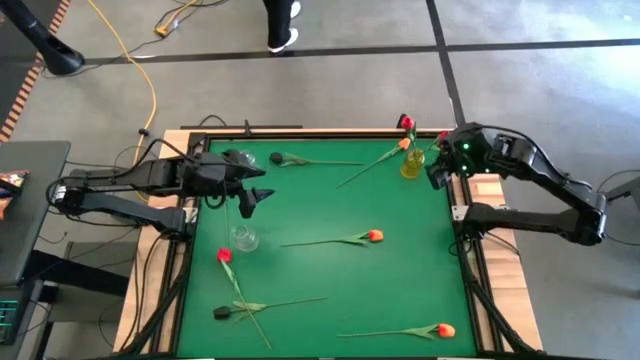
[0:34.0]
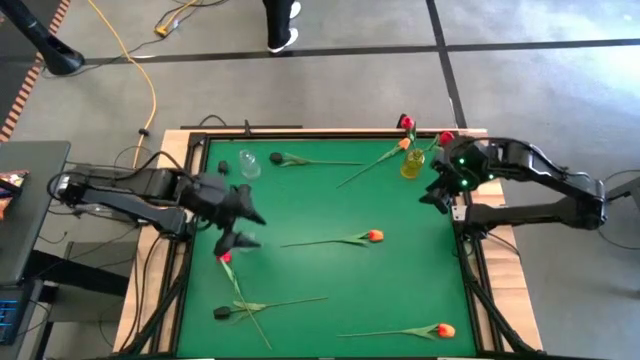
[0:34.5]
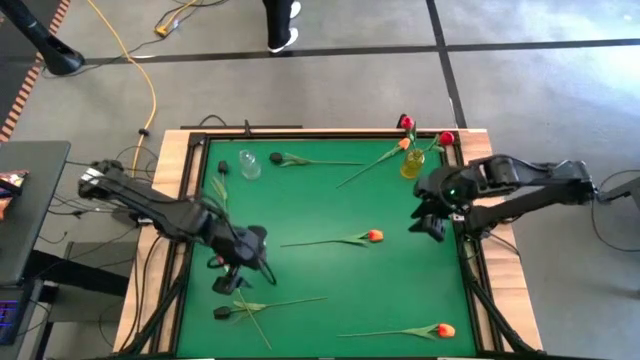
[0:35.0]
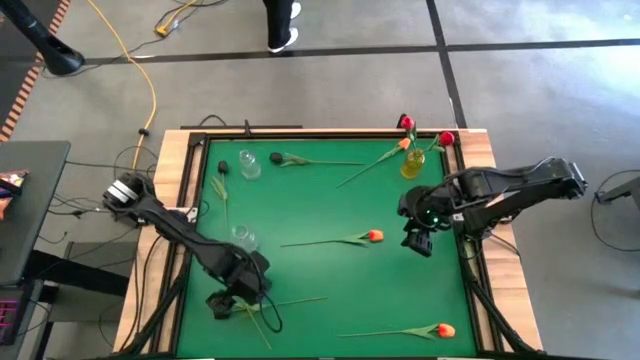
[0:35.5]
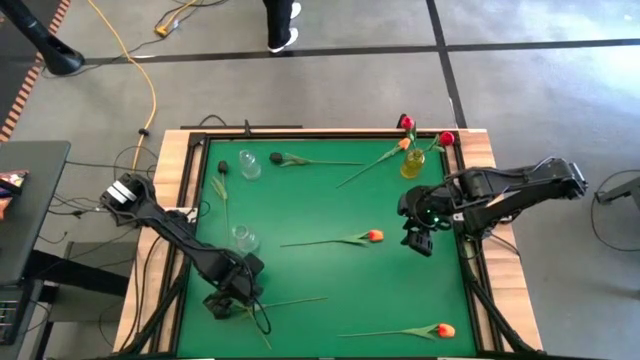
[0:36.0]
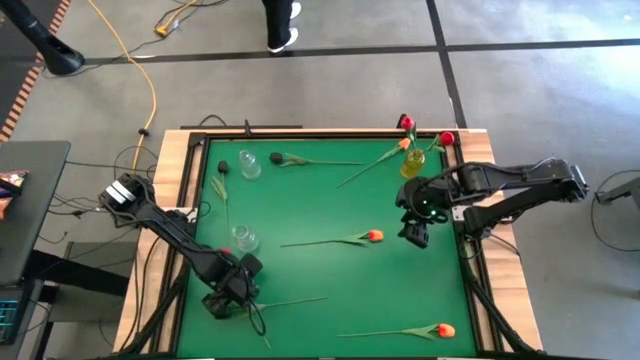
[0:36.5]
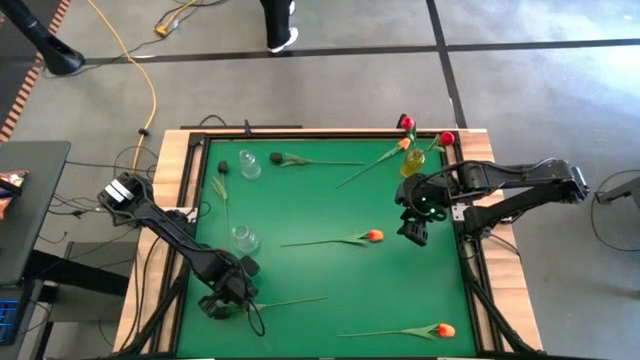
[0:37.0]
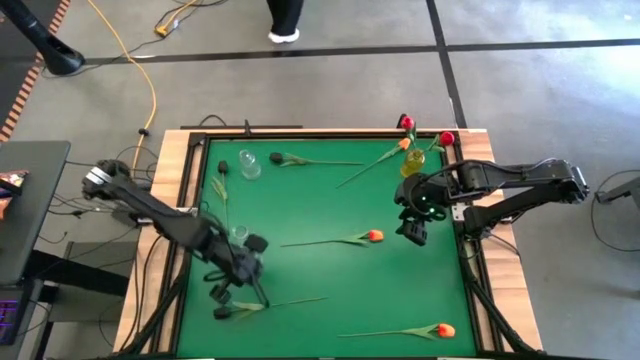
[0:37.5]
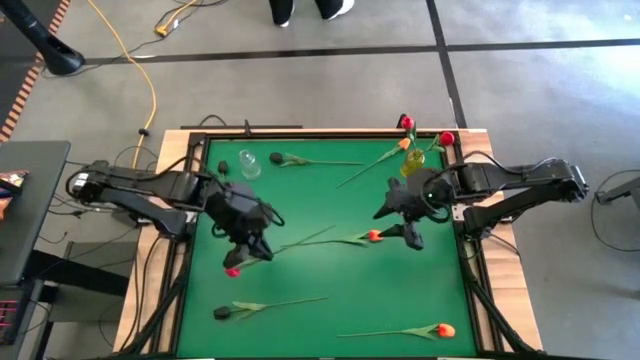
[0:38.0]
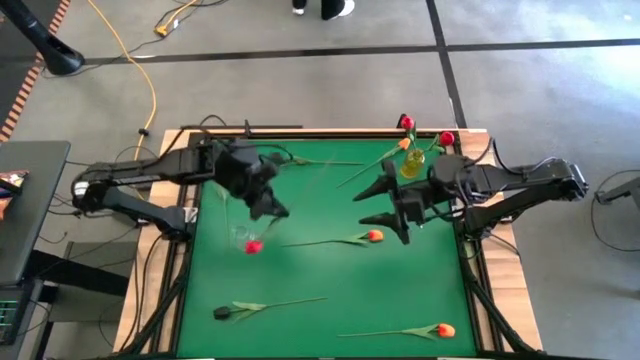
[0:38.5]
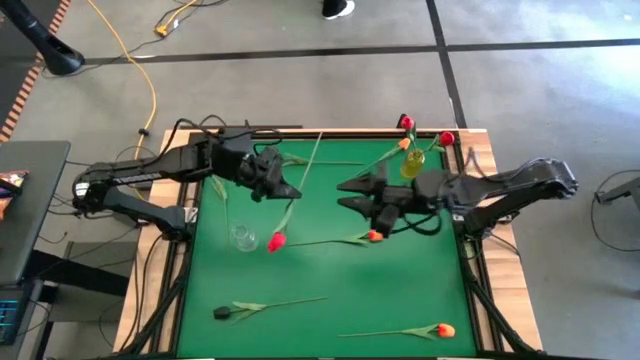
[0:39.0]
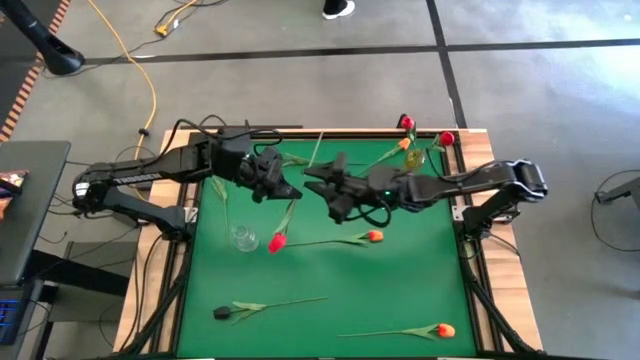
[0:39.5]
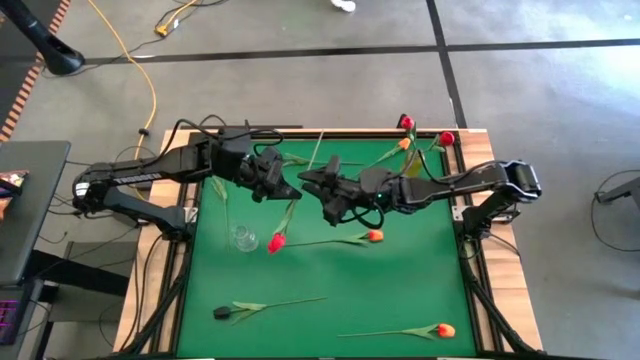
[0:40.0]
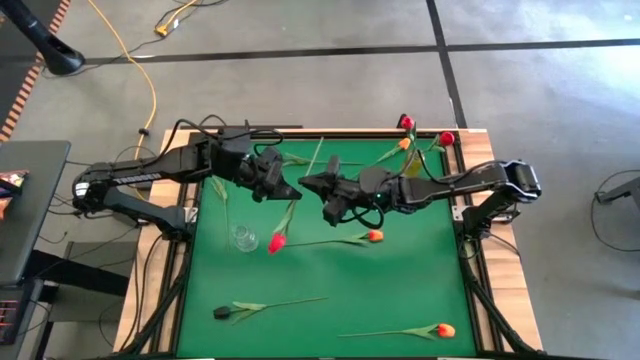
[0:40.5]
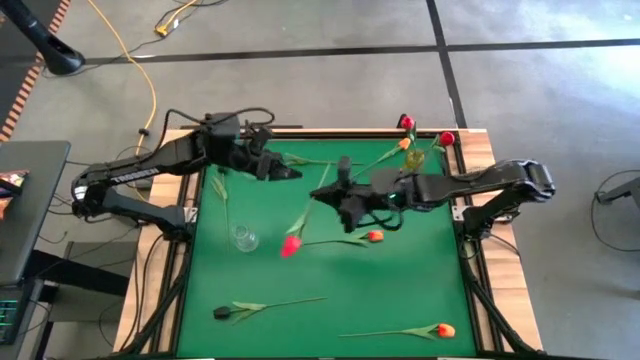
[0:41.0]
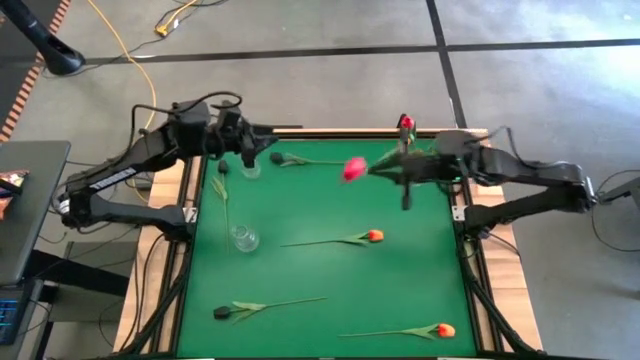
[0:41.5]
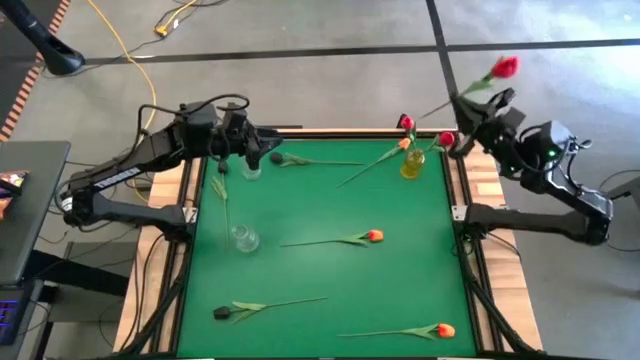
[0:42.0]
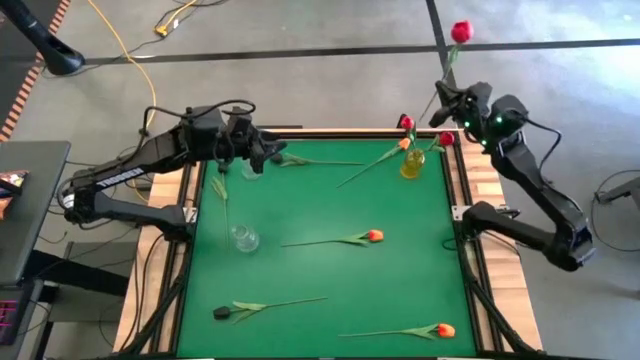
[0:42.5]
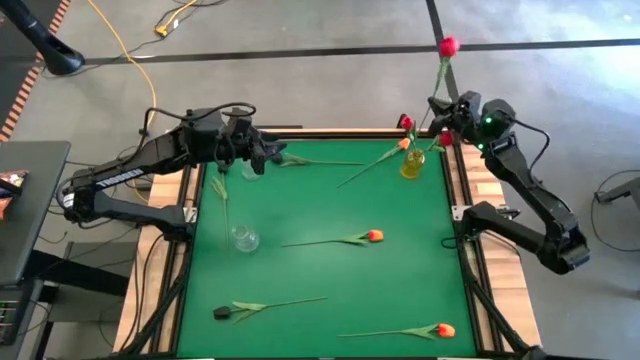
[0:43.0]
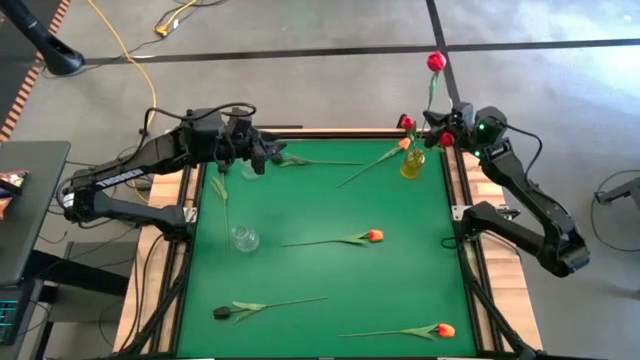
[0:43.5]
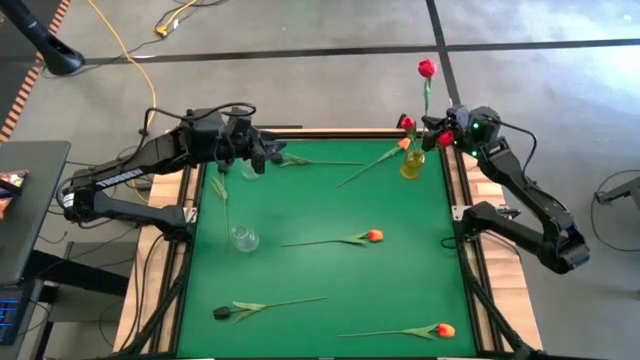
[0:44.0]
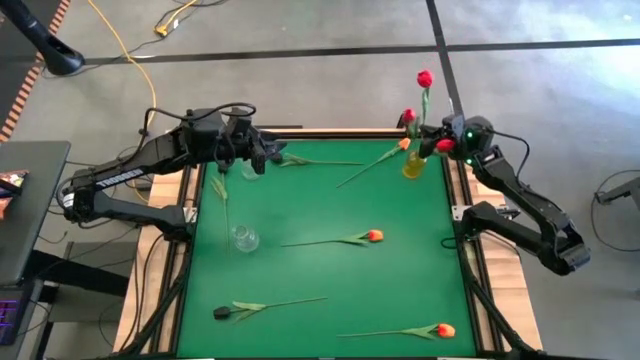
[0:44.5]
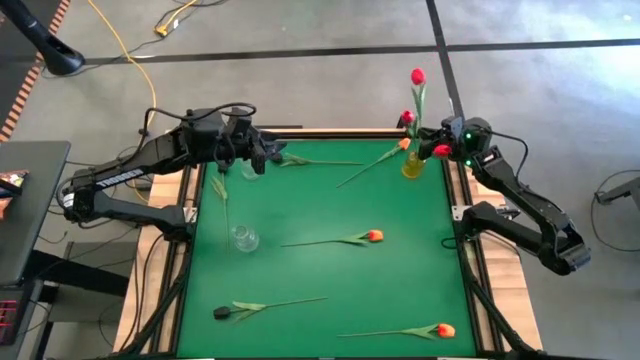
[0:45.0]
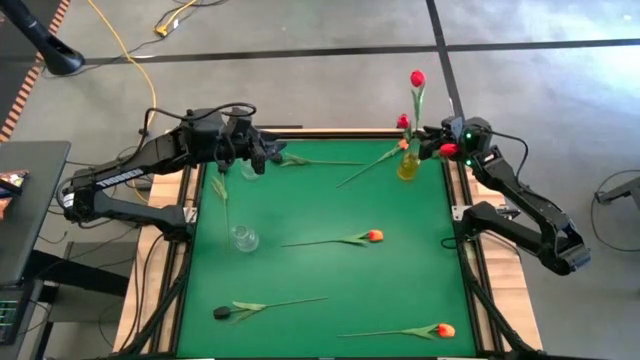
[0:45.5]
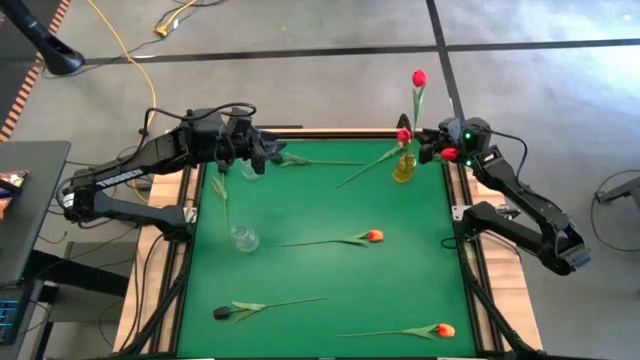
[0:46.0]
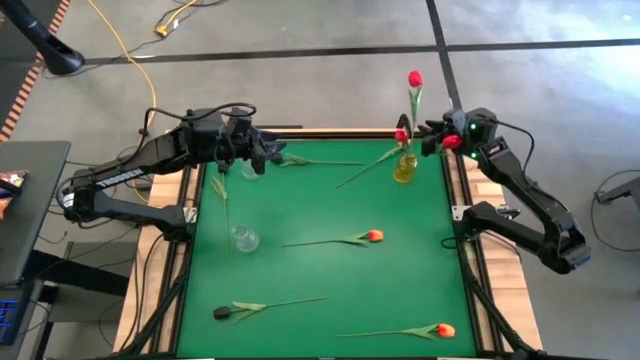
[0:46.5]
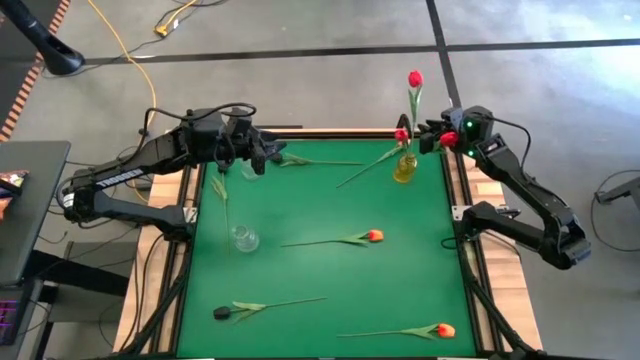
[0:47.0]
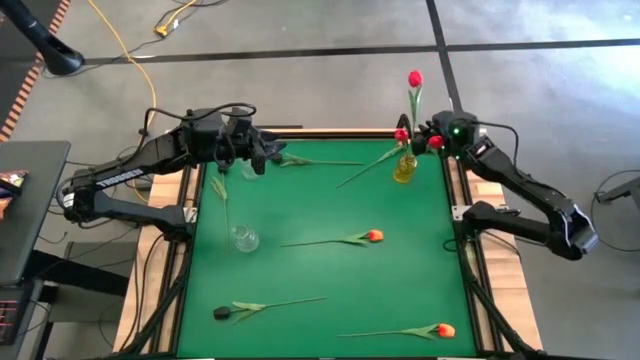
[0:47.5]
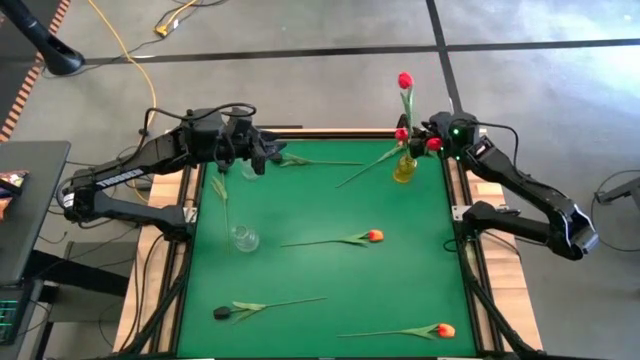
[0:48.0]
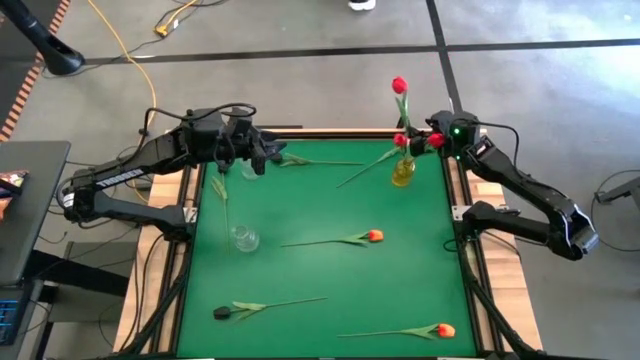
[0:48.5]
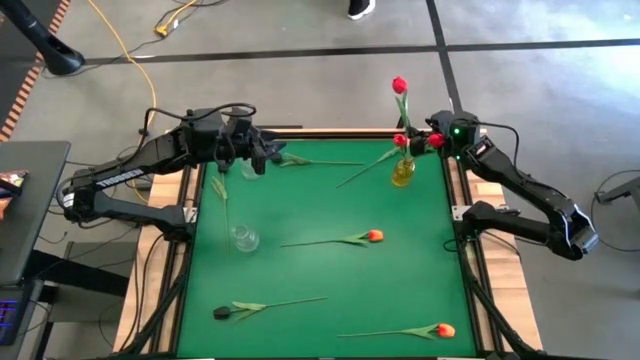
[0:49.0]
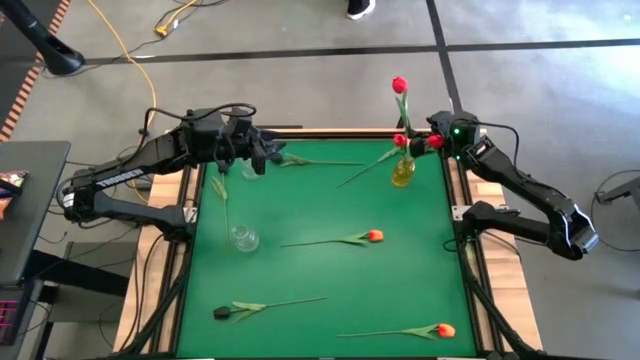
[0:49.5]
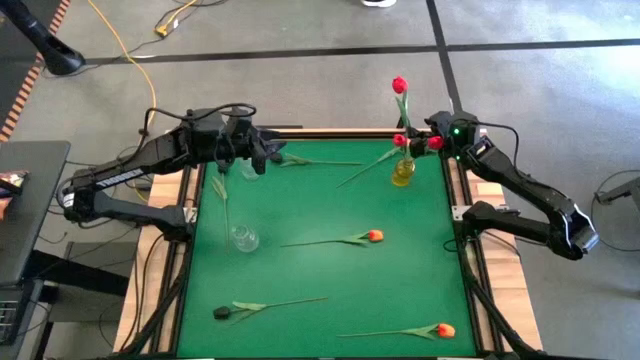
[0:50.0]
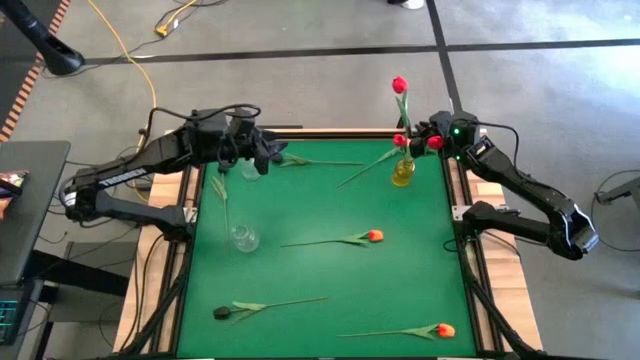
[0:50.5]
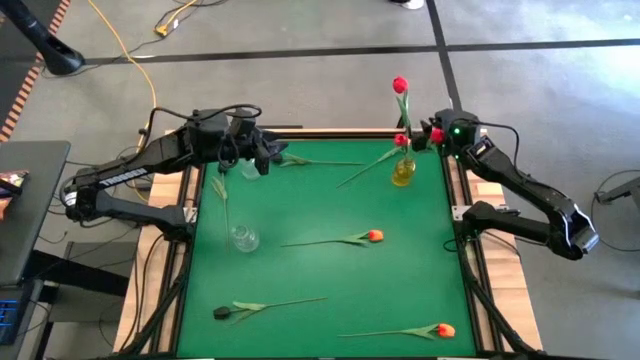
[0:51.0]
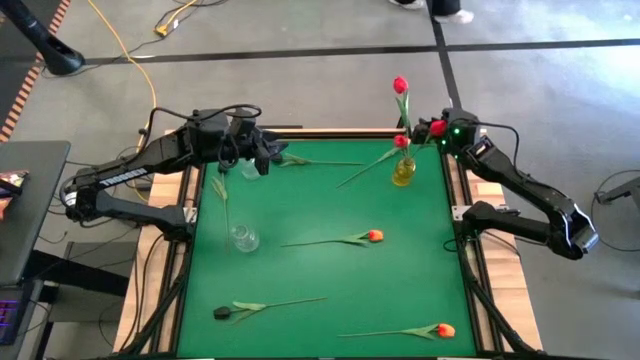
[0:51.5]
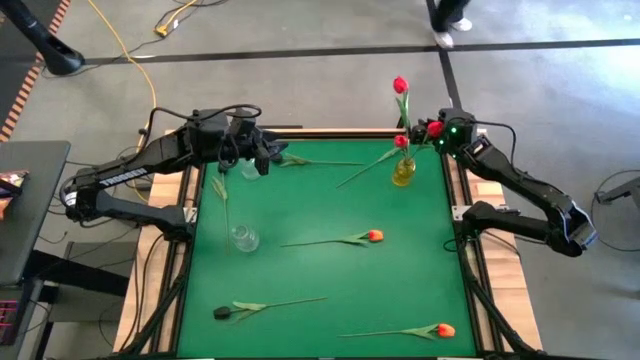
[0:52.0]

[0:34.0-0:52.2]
Task: Sort flowers into vase by color
Put the red flower into the yellow vase

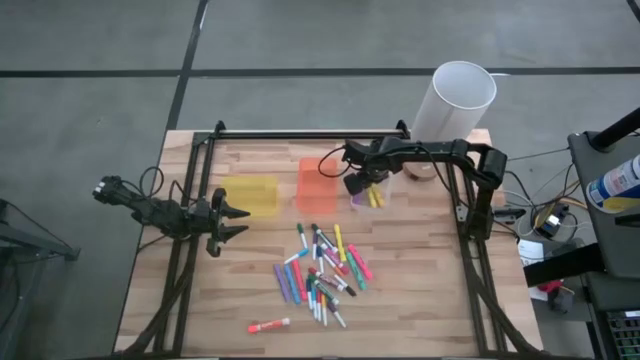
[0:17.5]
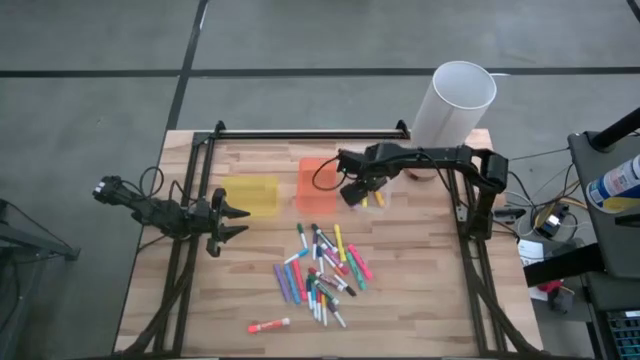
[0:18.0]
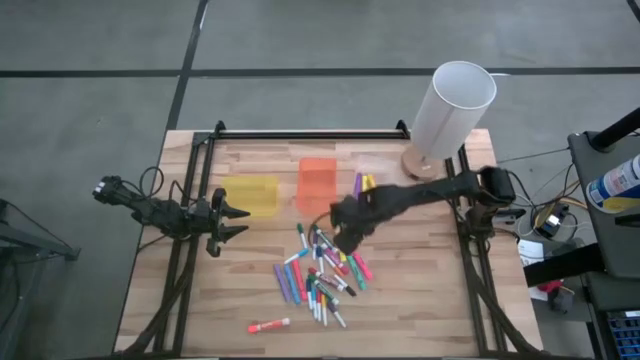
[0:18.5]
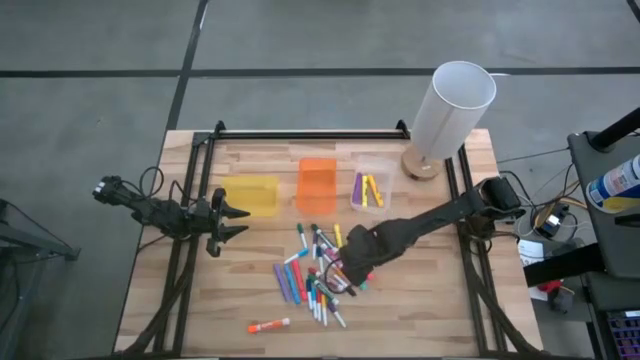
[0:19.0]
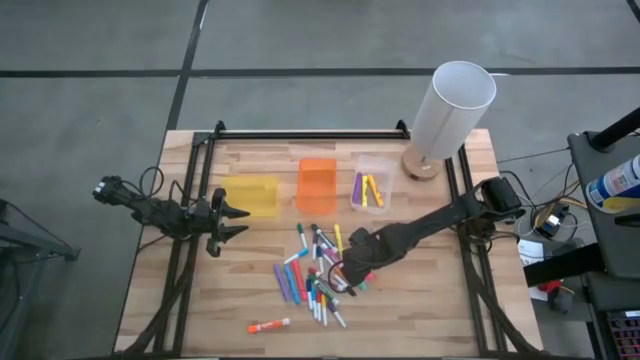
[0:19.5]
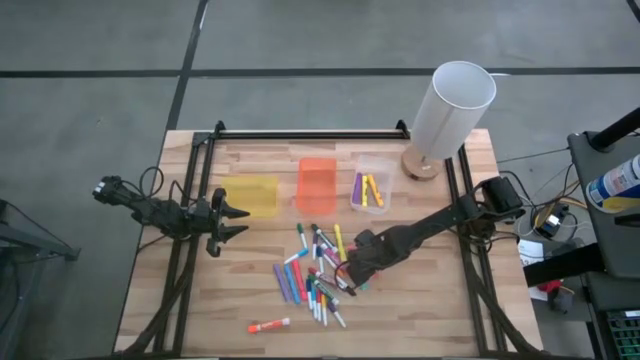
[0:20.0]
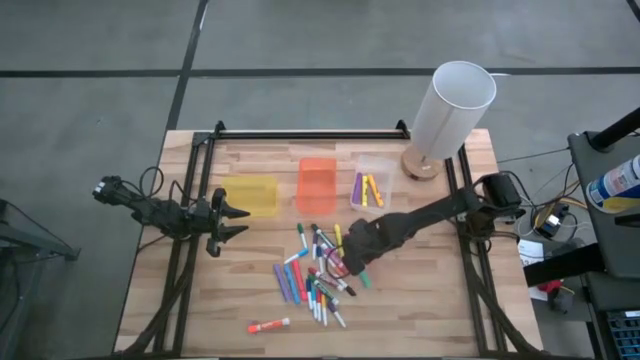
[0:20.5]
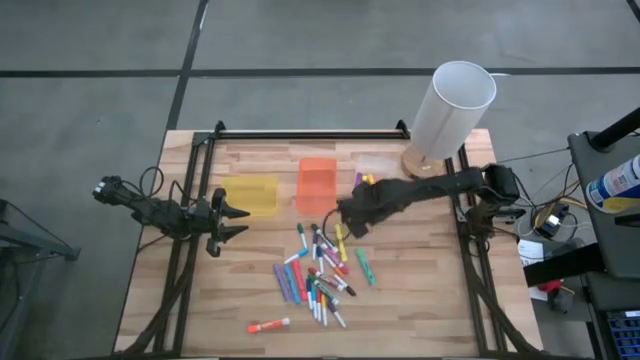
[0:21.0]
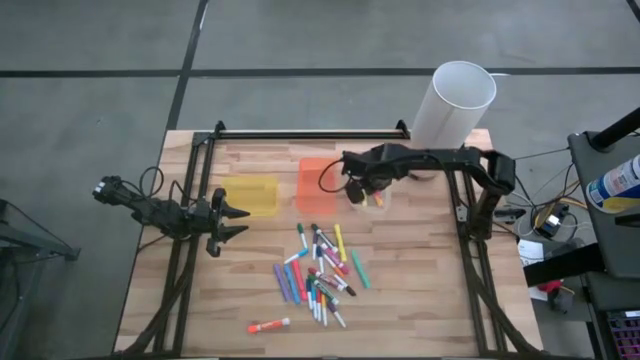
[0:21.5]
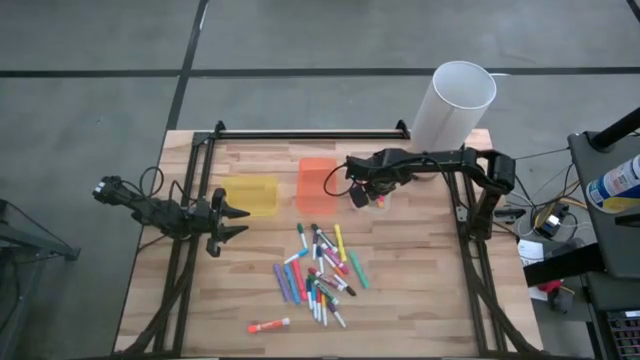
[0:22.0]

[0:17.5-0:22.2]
Task: Pick & Place Markers
Put the pink highlighter into the transparent bin
